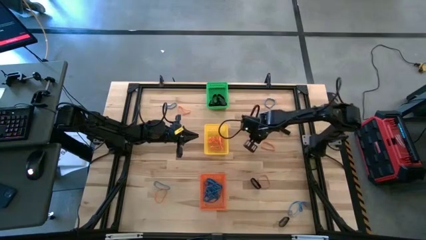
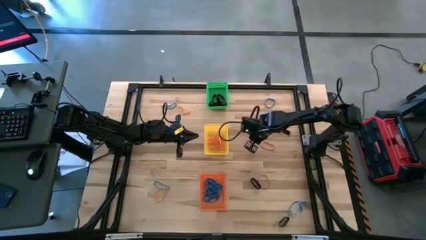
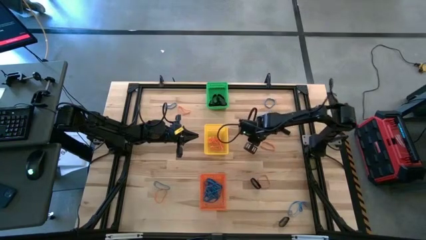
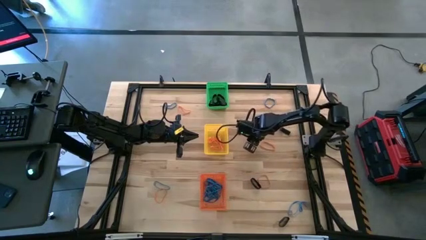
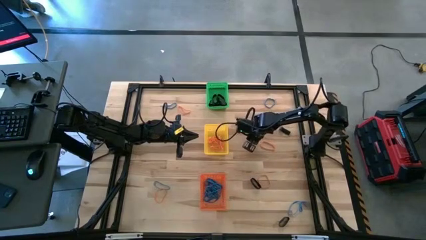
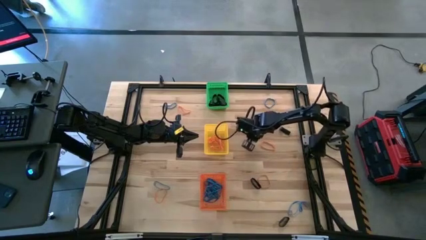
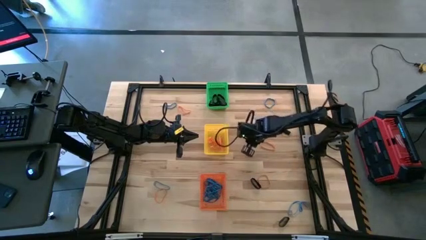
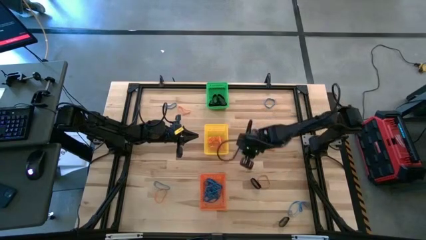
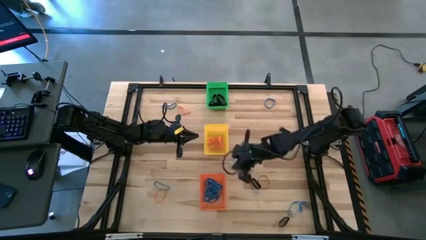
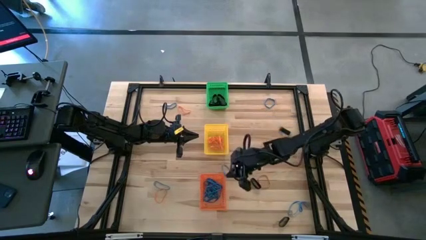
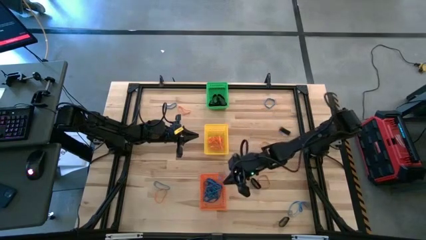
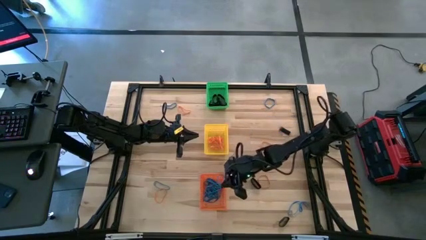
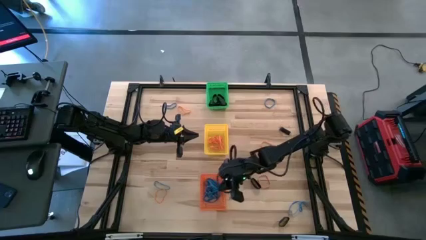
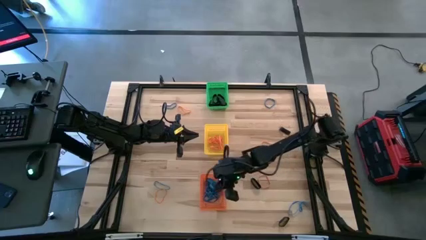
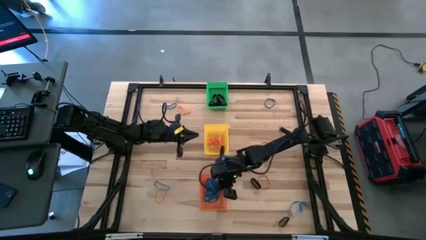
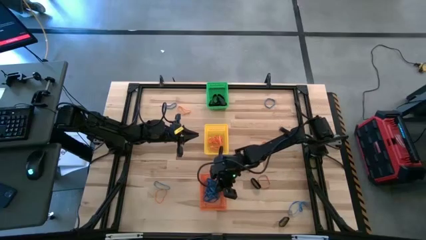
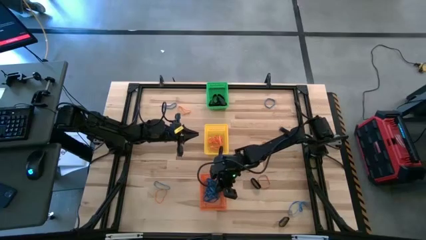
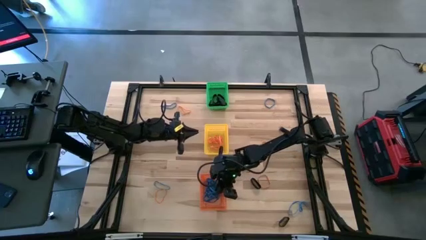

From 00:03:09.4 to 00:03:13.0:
Task: Sort rubber bands into baskets
Put the blue rubber band into the orange bin

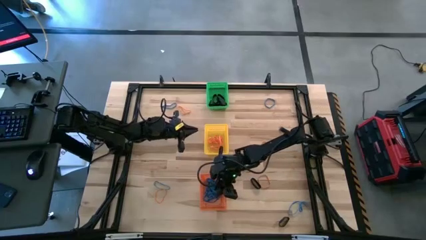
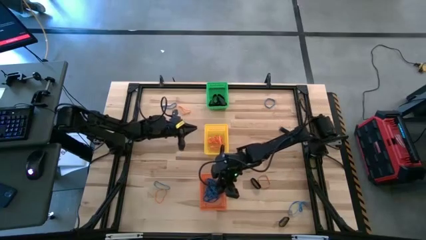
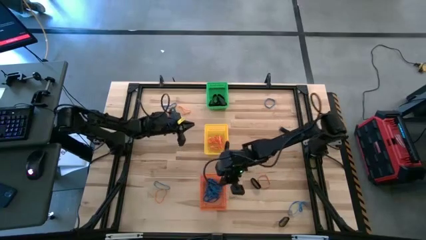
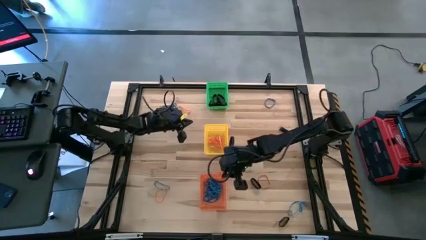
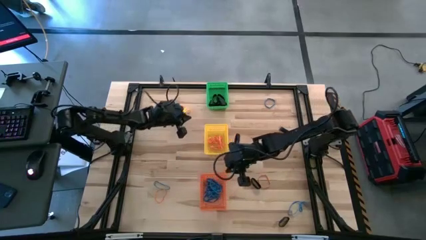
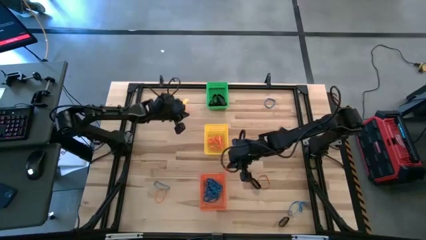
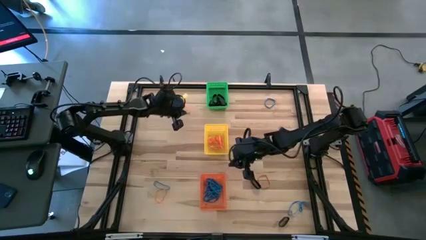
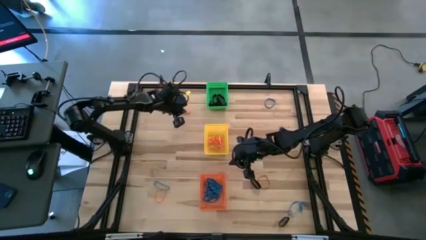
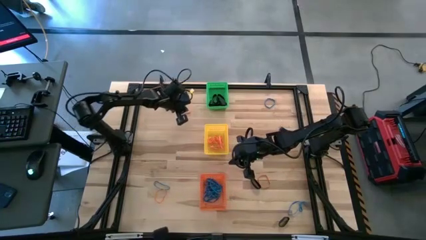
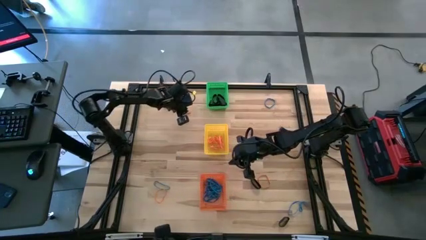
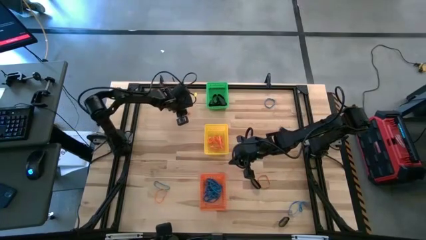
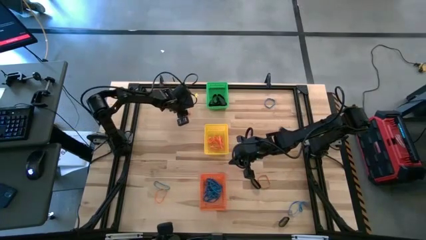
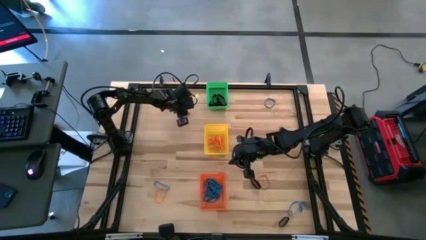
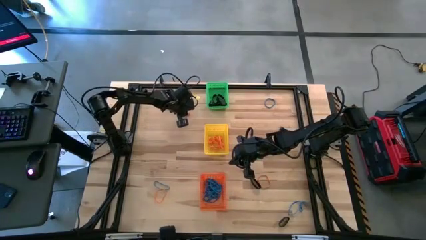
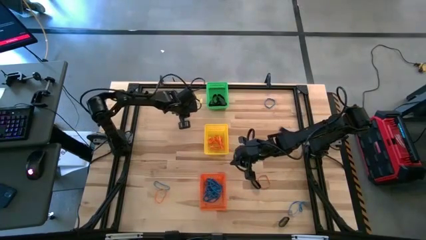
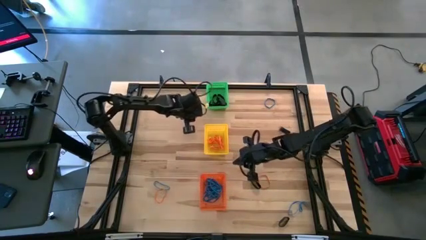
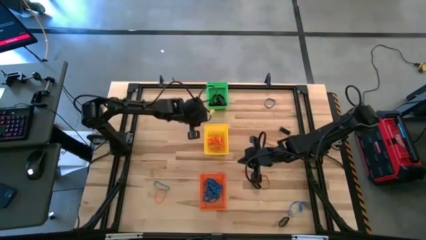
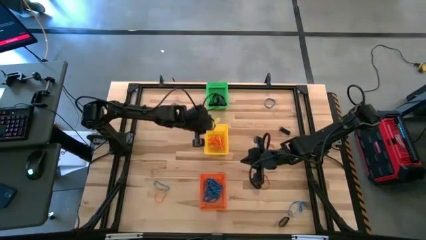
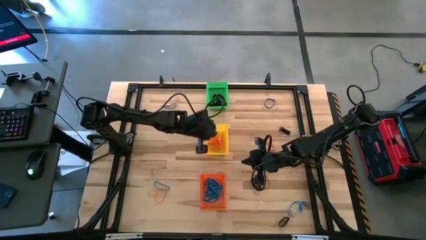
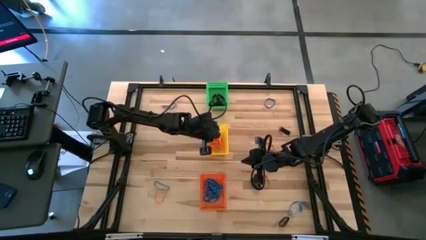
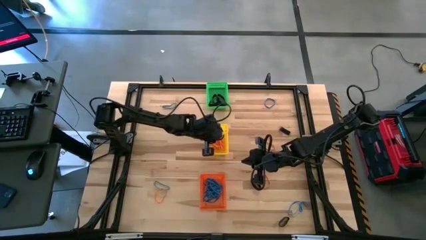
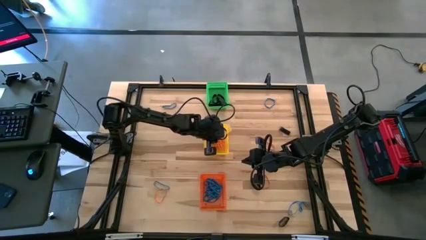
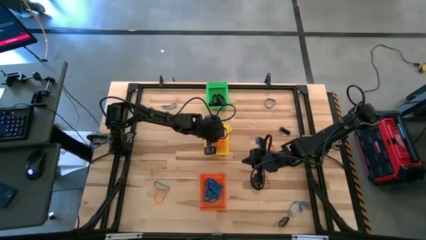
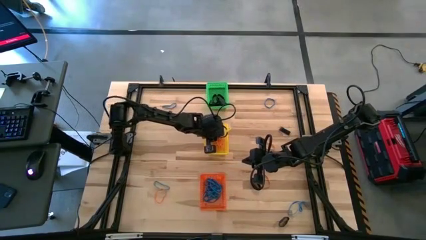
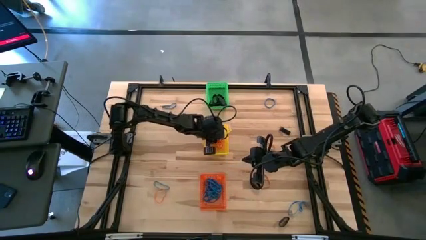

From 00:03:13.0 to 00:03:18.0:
Put the orange rubber band into the yellow bin

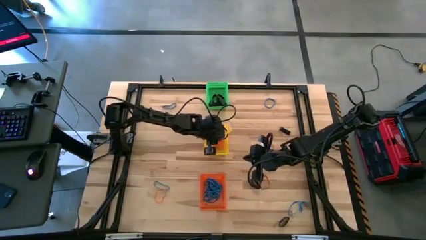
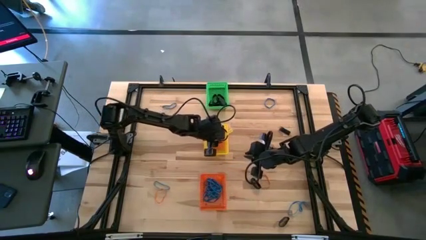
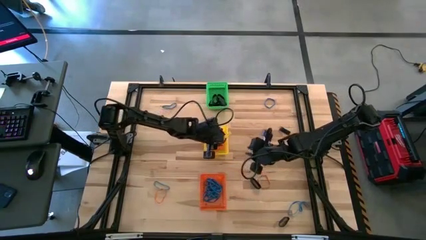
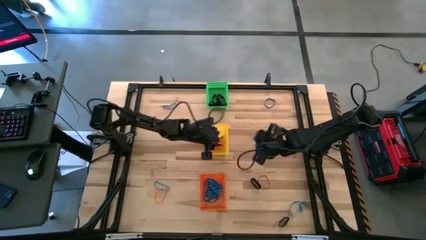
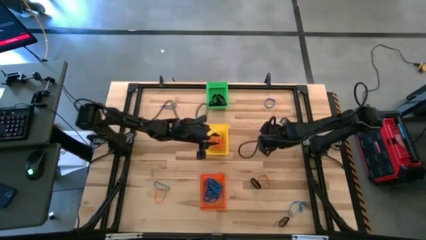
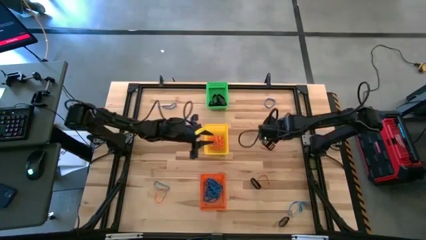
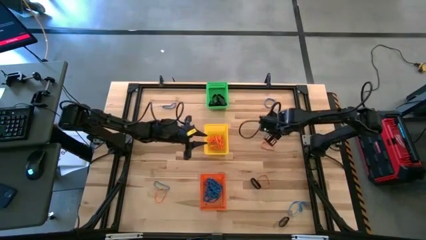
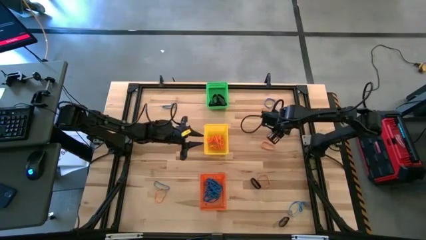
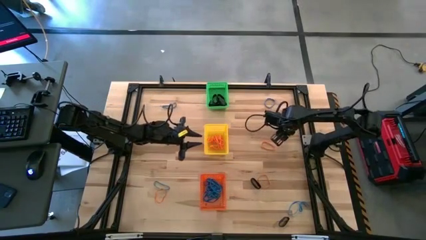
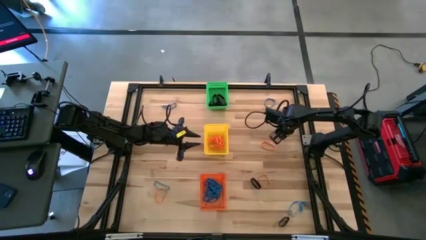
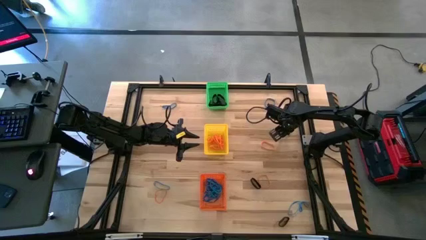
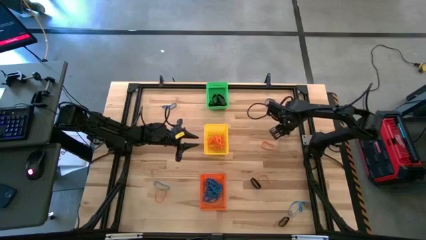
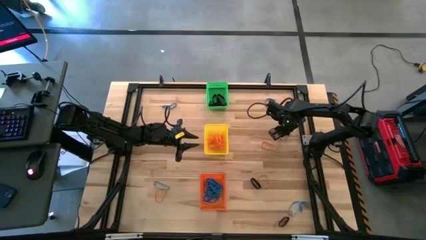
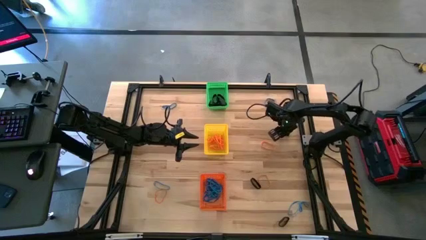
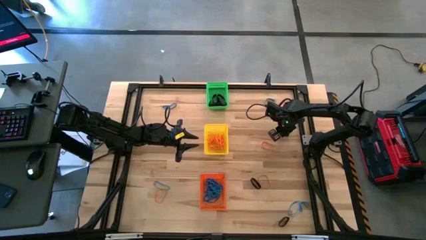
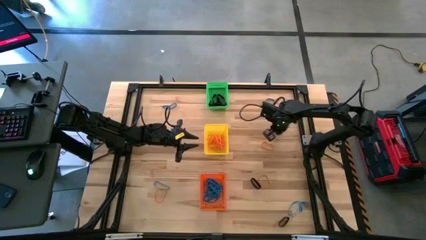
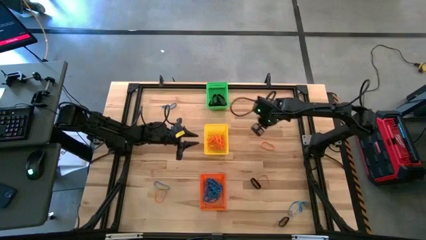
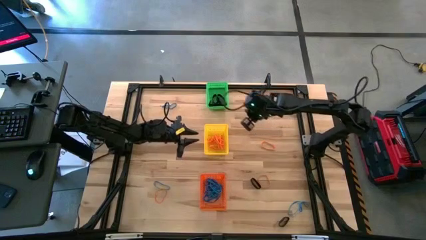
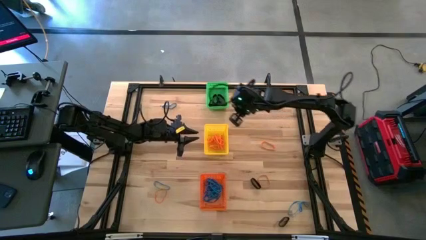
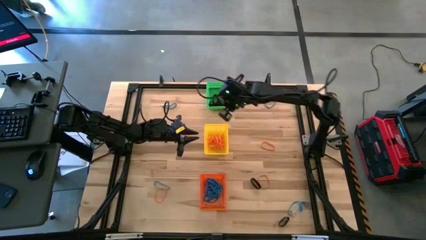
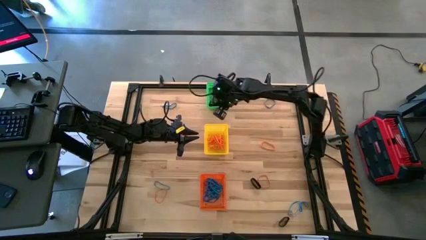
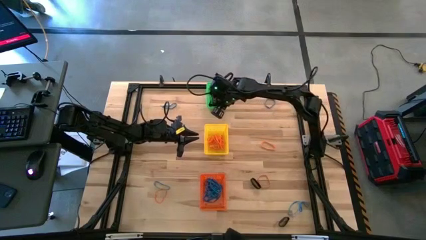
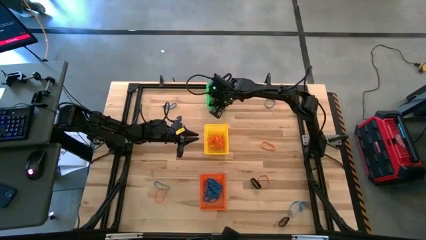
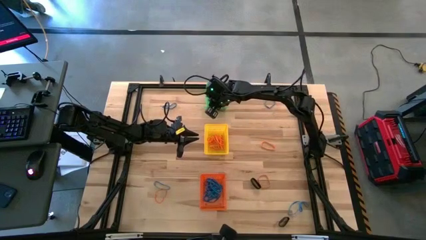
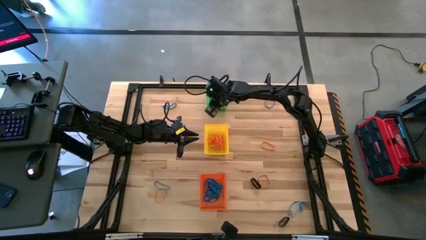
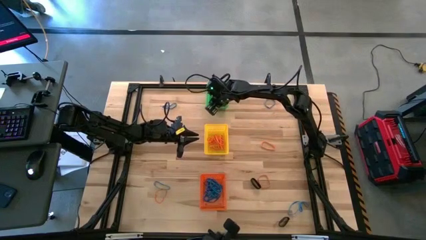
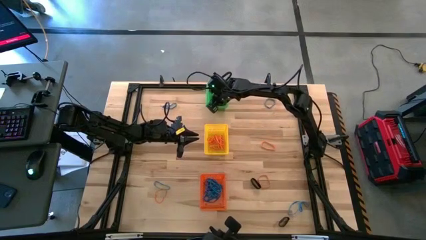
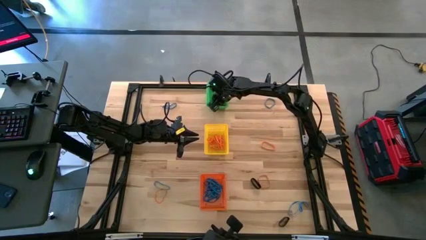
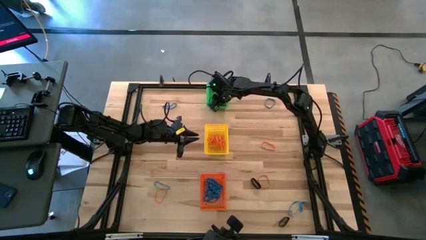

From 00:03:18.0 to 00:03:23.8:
Put the black rubber band into the green bin

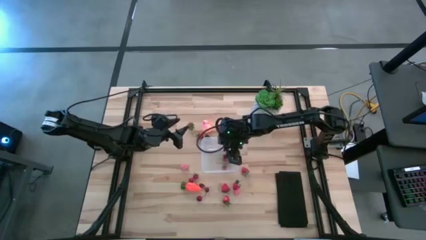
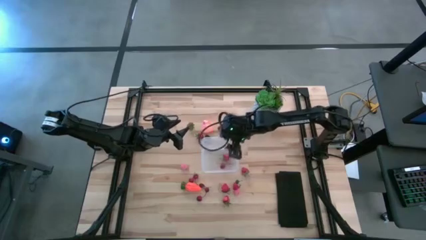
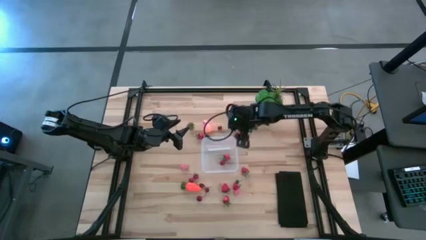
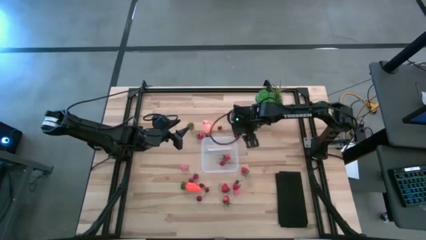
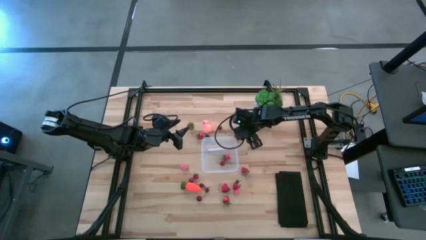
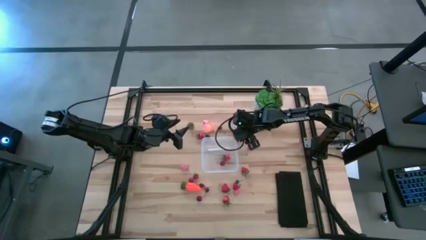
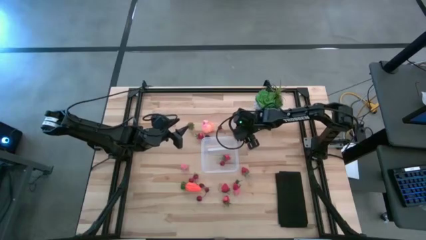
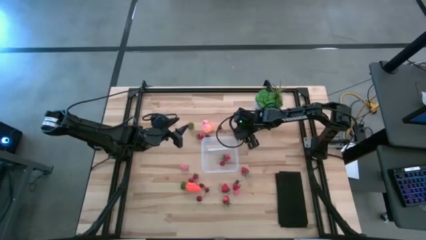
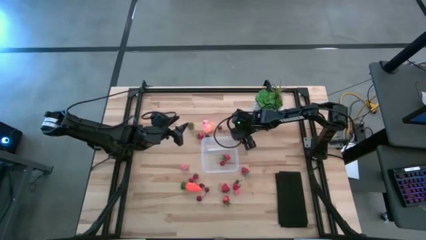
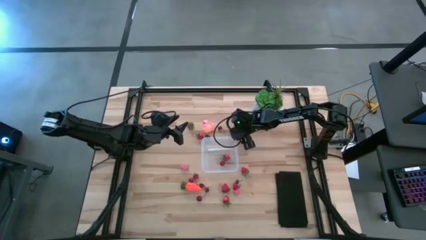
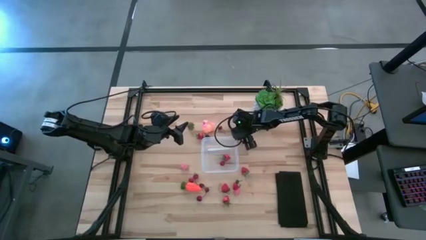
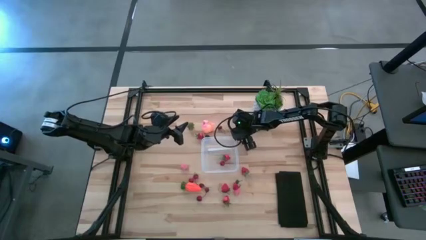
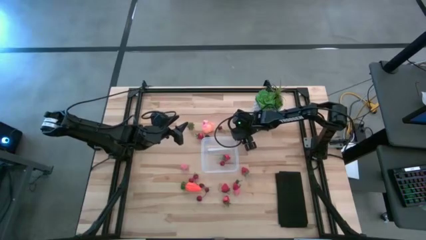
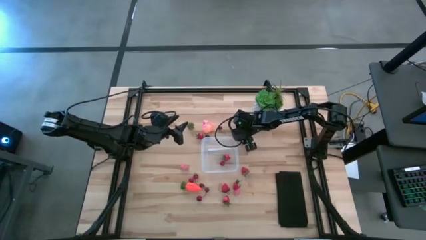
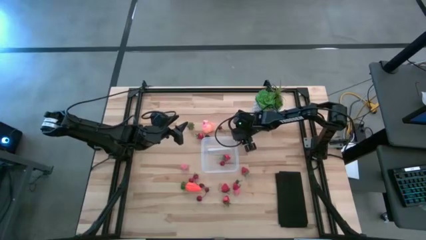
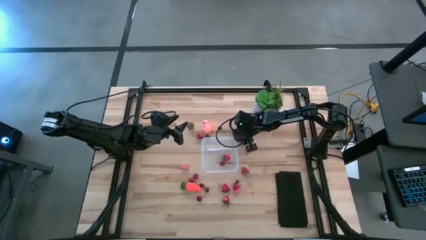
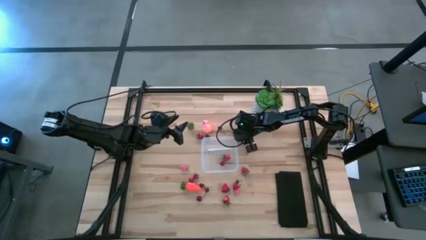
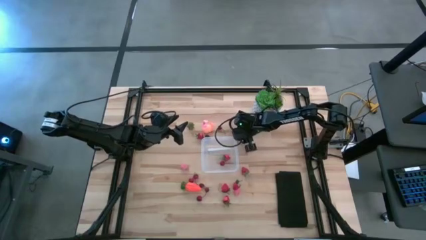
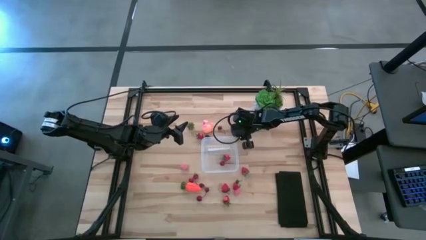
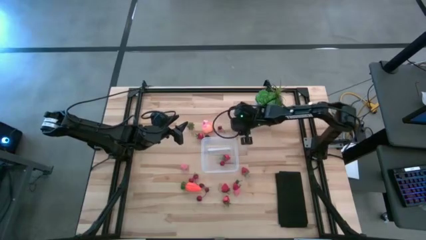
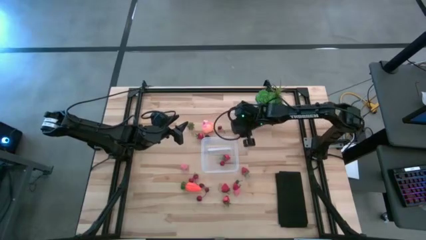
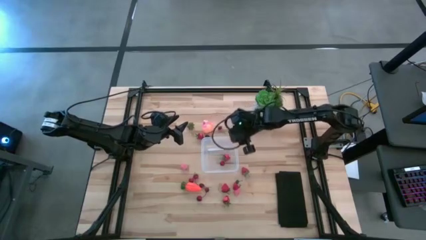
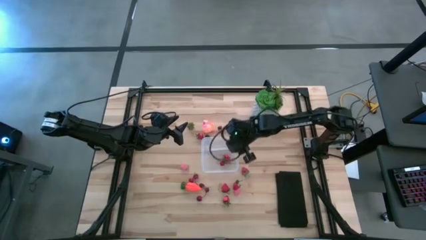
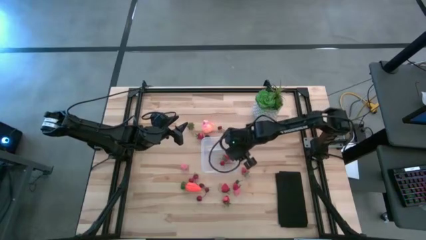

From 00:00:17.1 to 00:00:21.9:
Task: Pick and placing Produce into tupperware
Put the red cherry into the transparent container
